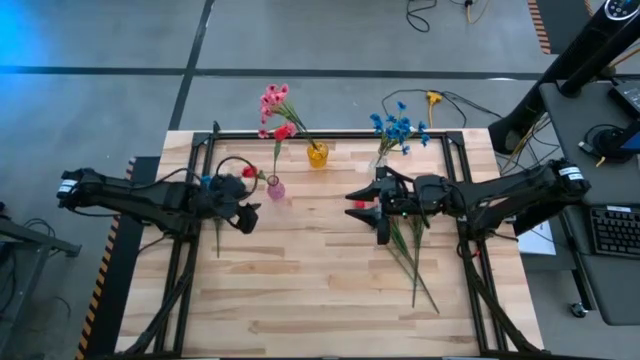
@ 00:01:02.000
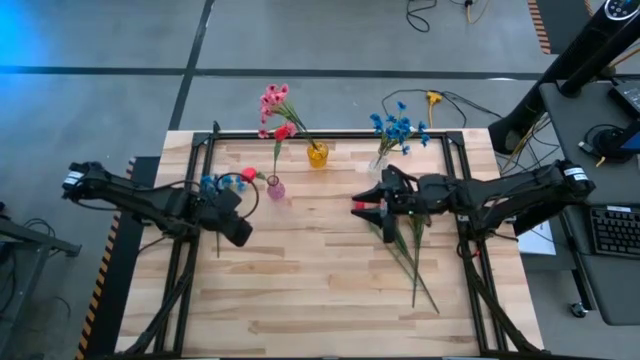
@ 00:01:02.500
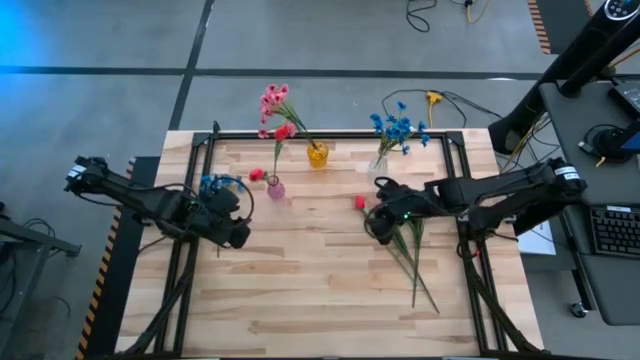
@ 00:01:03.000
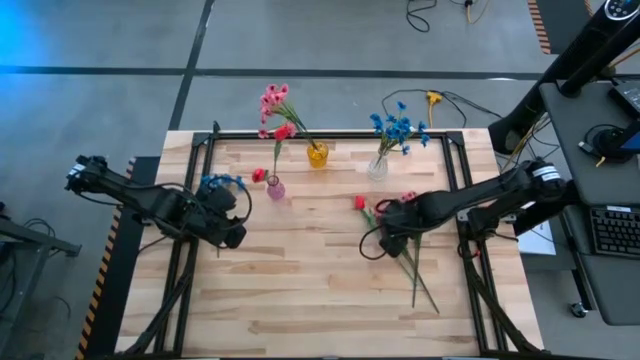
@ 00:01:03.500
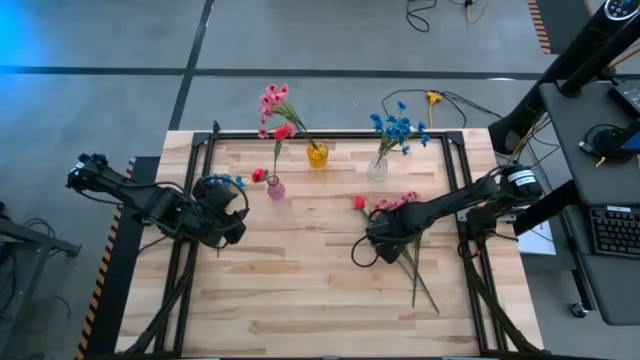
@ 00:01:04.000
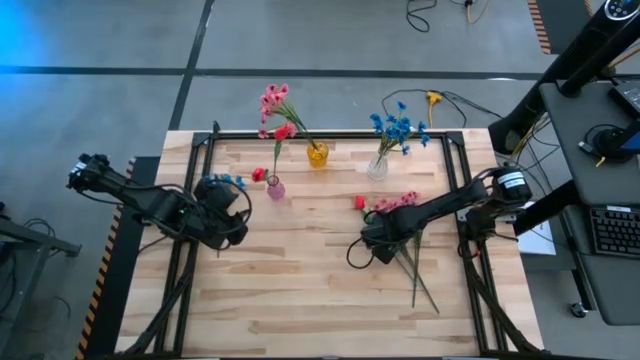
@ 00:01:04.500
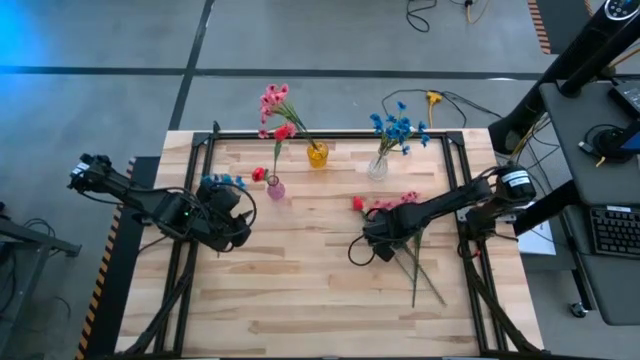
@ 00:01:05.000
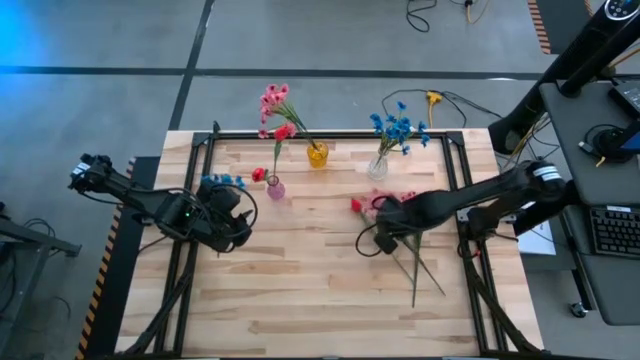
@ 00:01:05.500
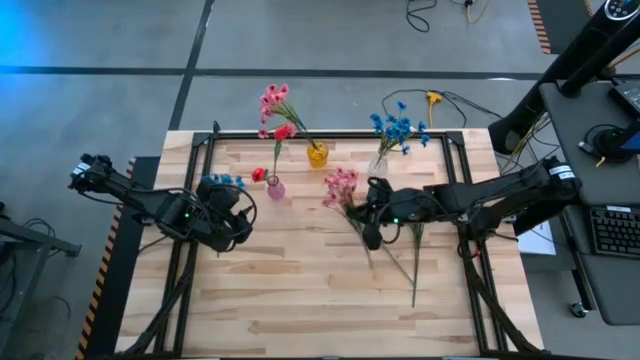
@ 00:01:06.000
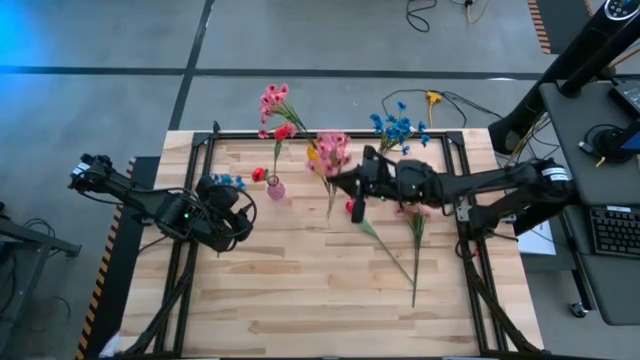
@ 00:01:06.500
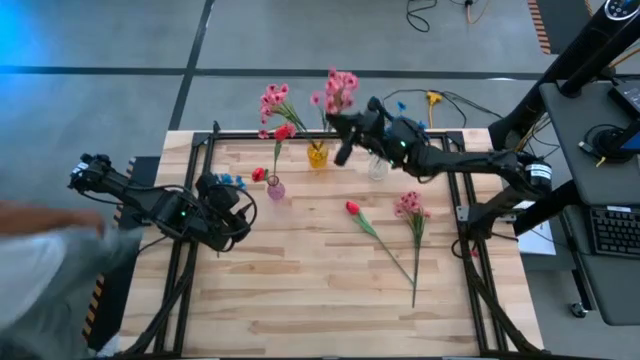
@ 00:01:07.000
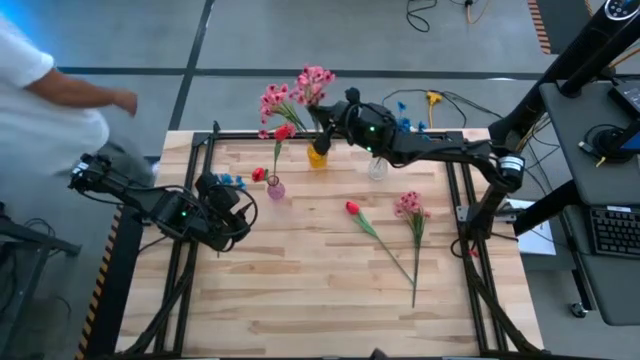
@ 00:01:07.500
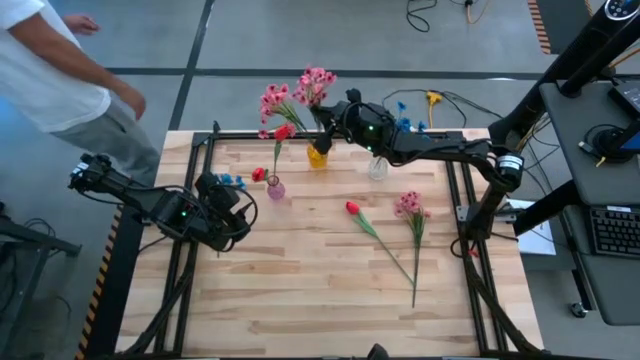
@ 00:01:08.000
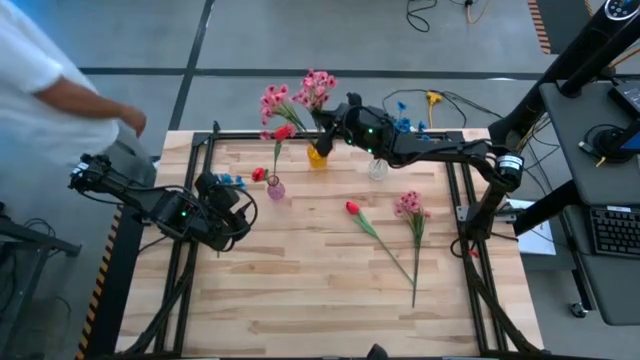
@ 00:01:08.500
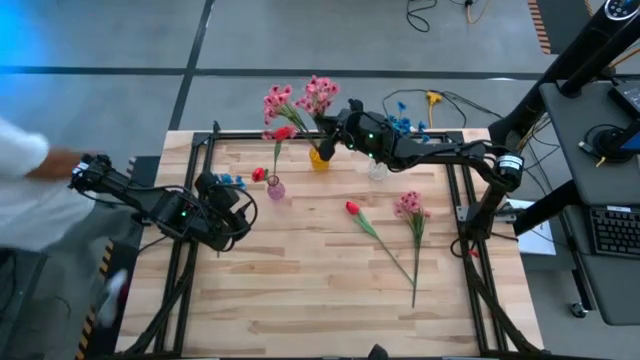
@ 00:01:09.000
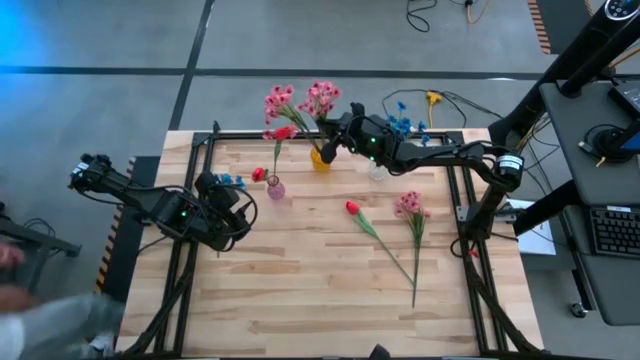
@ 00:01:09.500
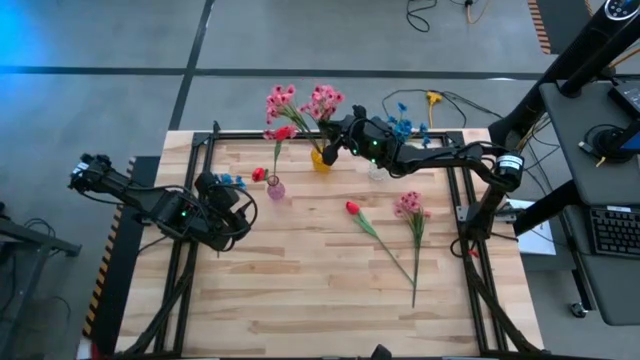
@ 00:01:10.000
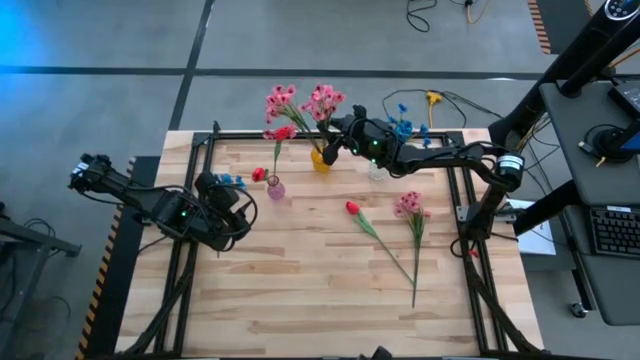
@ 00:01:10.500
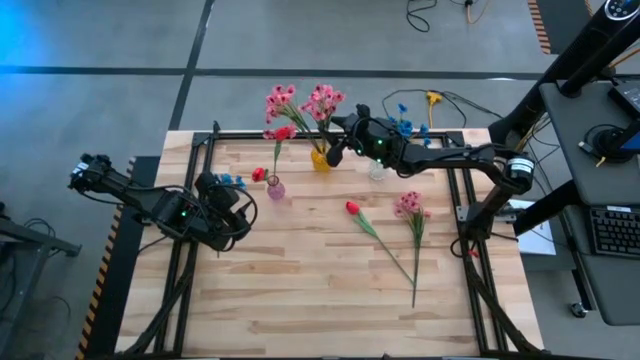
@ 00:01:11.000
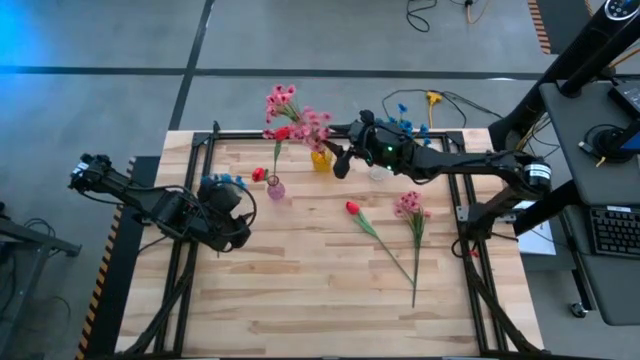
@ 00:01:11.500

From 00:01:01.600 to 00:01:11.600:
Task: Sort flowers into vase by color
Put the left pink flowers into the yellow vase

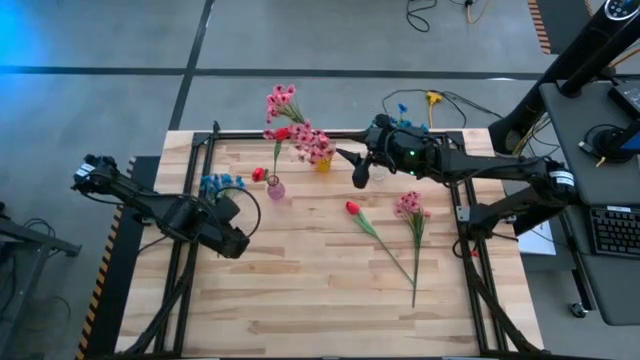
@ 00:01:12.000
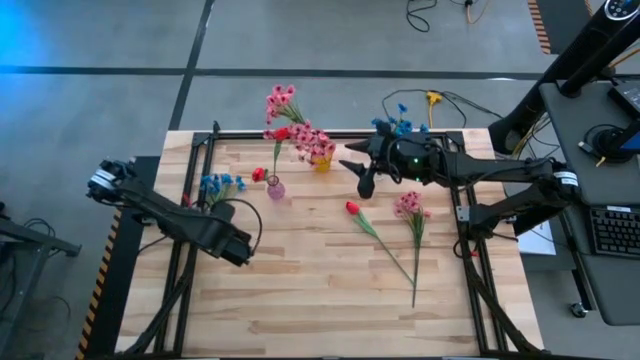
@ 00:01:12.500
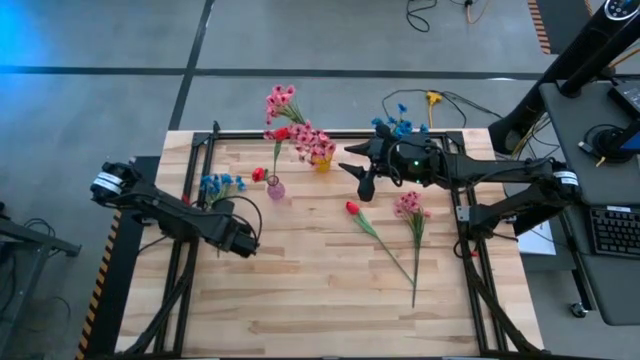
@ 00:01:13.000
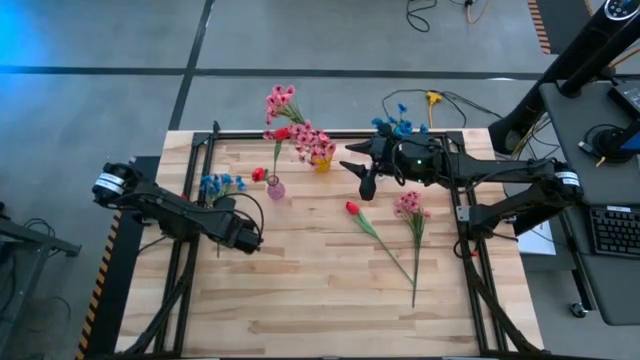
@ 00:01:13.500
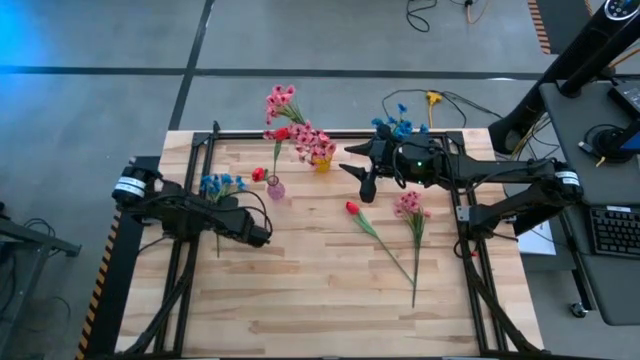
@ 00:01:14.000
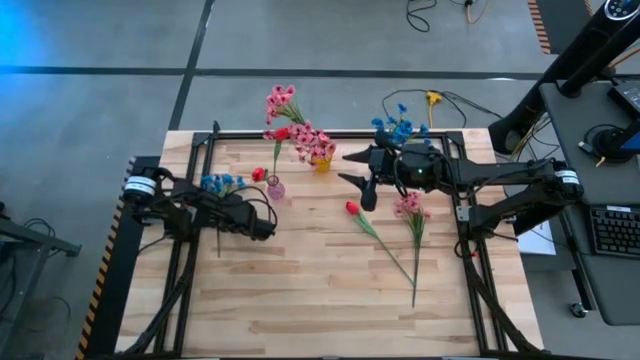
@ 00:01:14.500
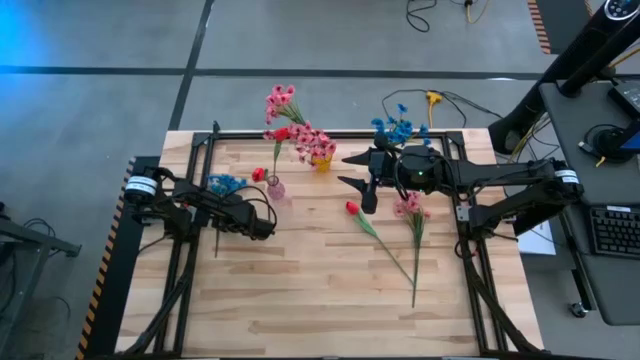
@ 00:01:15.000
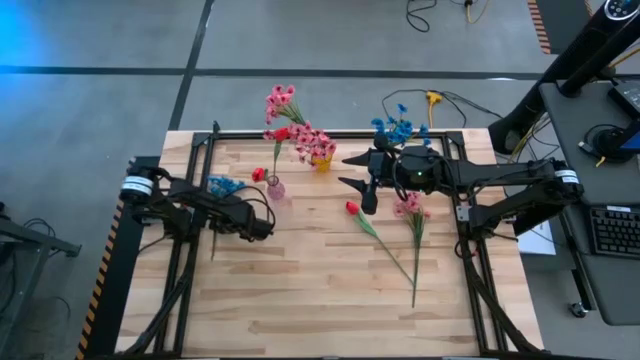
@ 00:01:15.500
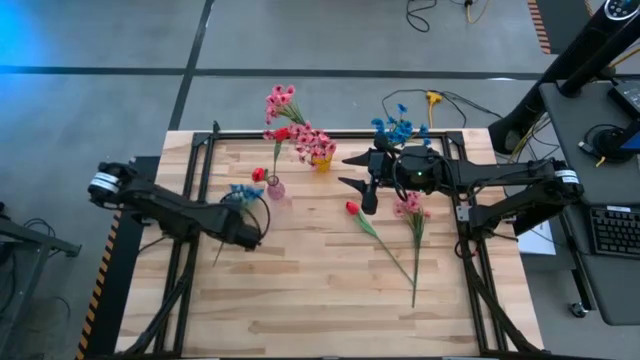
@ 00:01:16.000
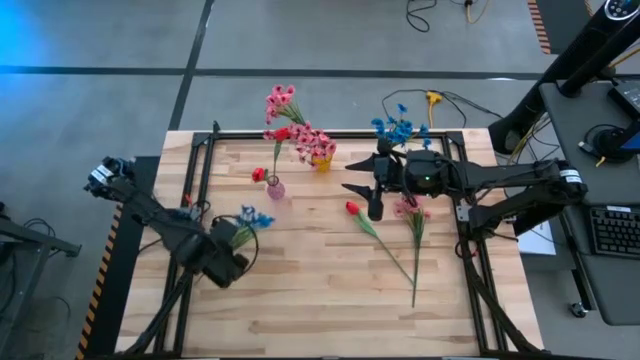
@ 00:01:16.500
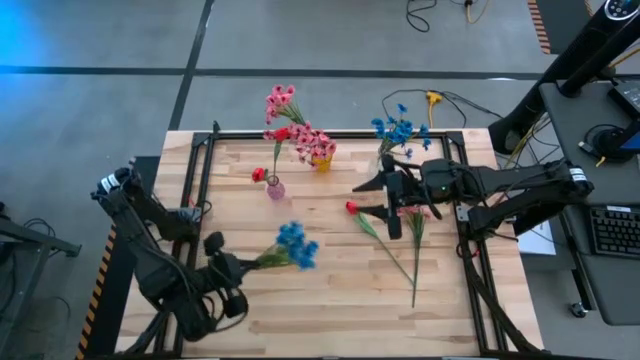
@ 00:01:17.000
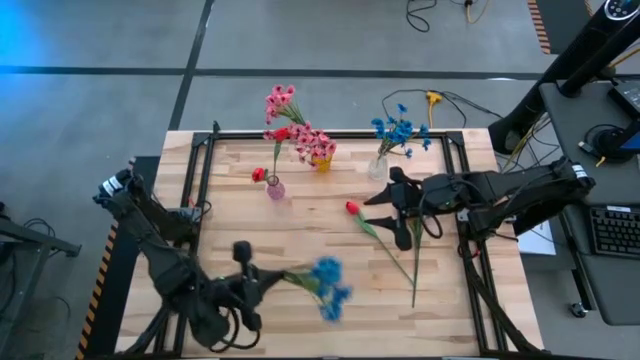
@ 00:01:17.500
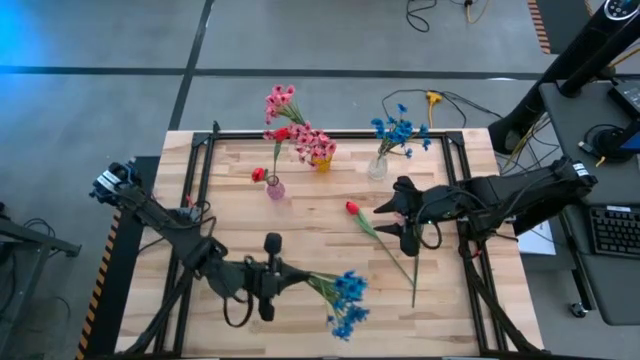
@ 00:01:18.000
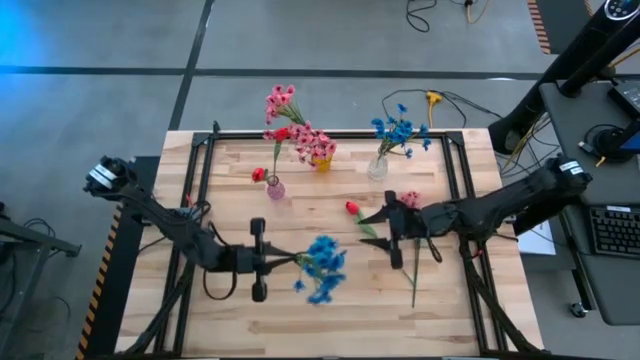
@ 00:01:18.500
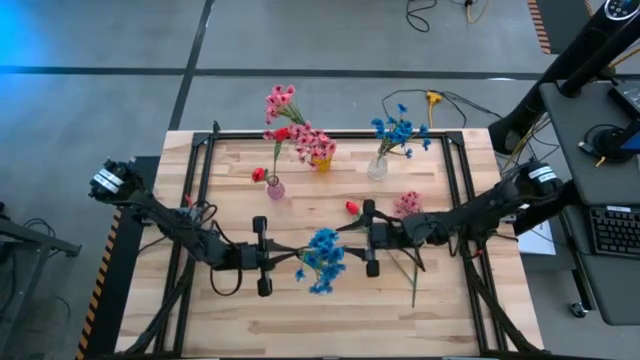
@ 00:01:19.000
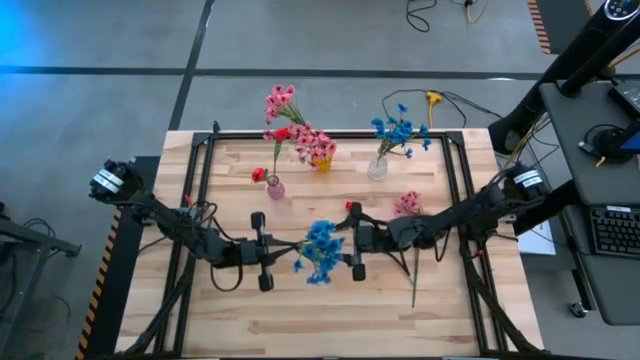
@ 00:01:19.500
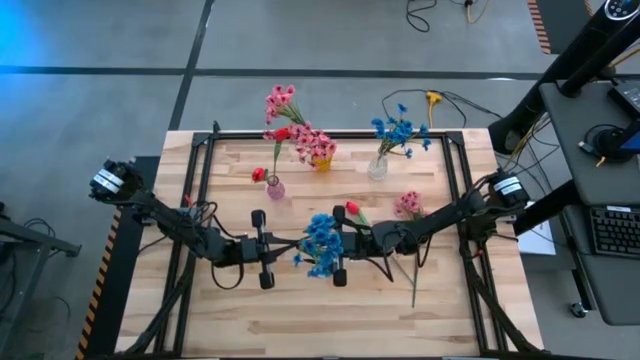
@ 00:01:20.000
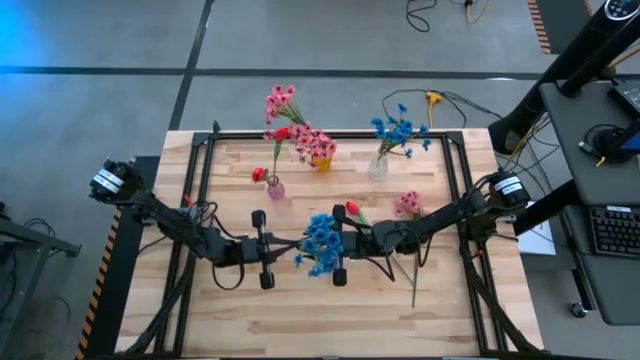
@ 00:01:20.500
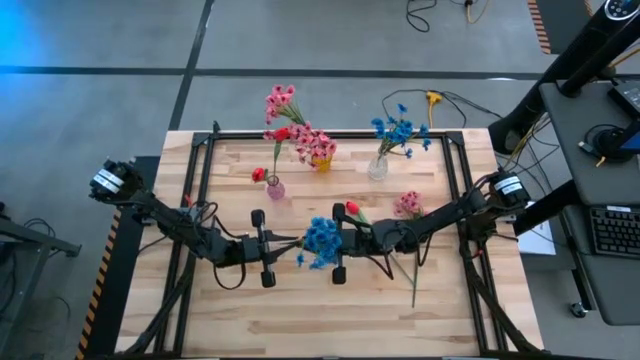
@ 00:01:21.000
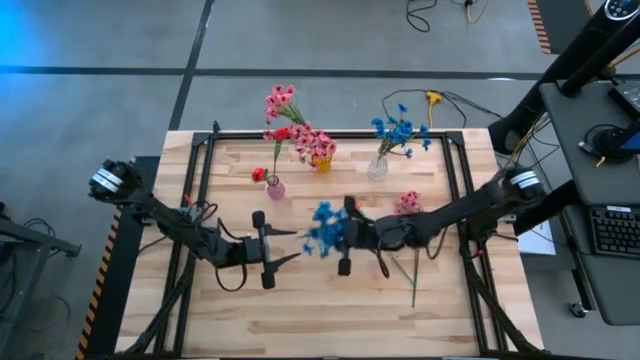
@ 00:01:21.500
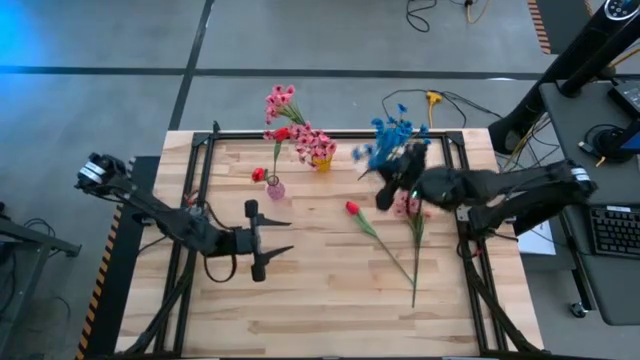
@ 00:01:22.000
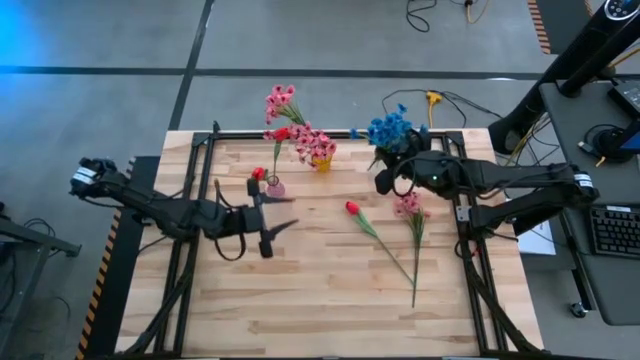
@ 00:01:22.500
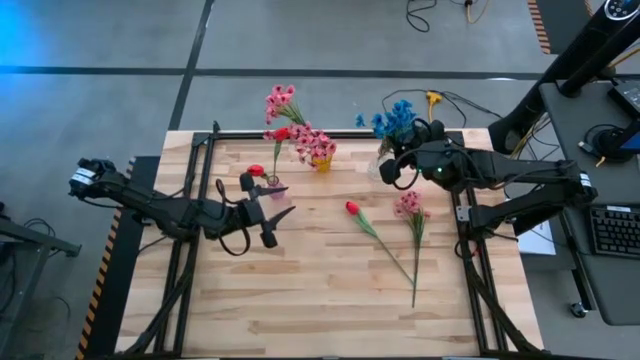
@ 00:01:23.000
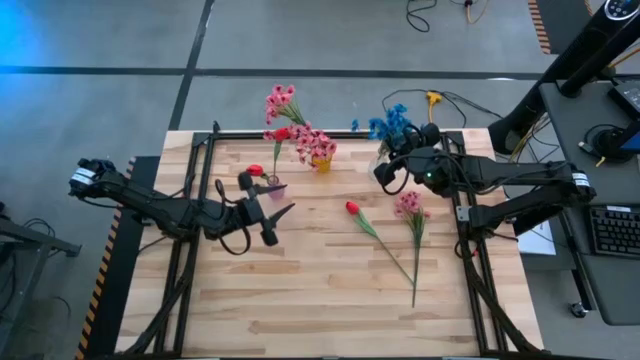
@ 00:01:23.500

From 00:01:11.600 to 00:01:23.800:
Put the blue flowers into the transparent vase
